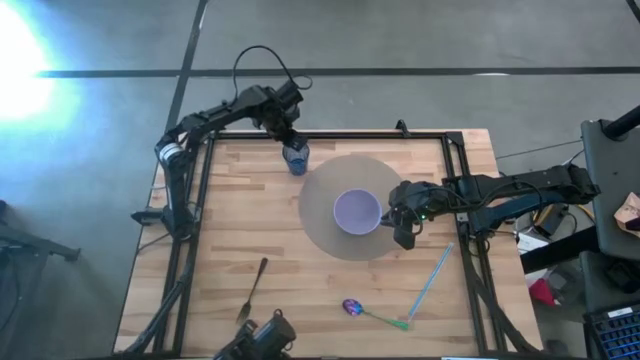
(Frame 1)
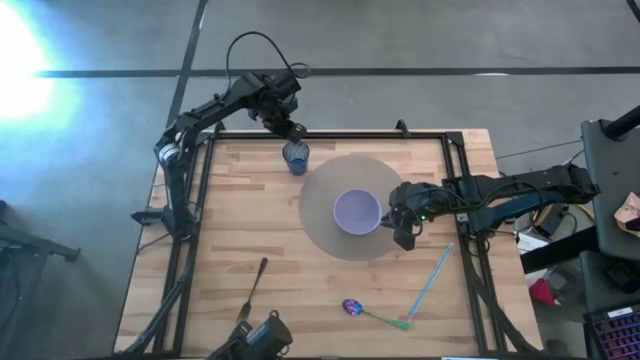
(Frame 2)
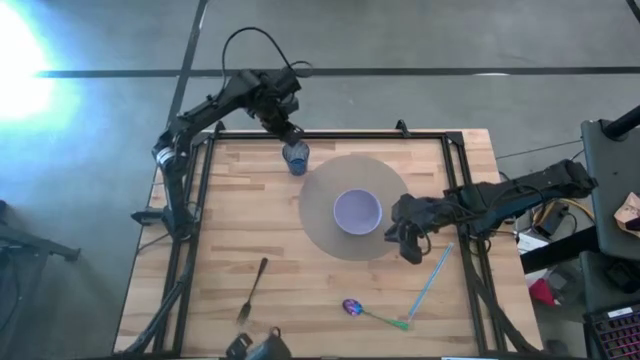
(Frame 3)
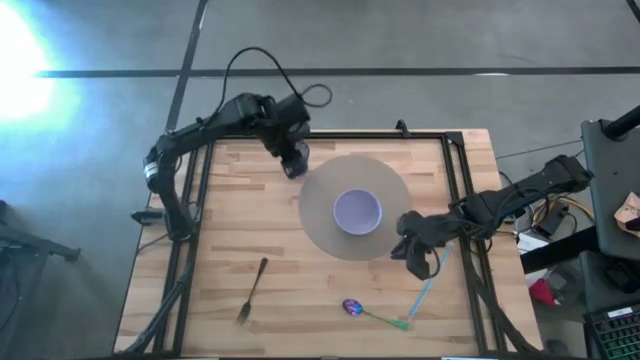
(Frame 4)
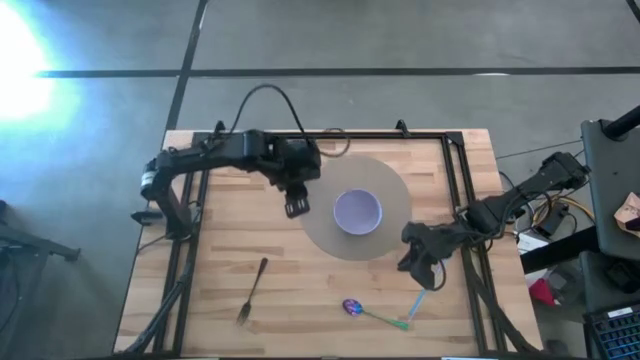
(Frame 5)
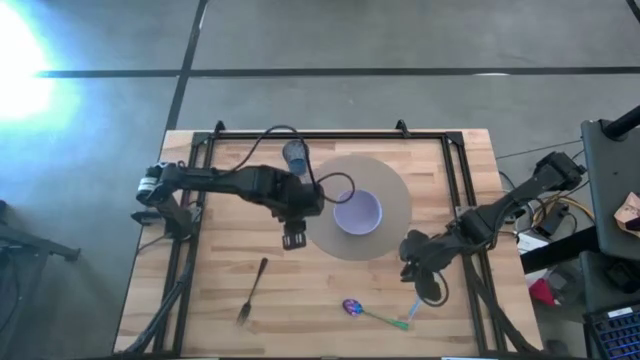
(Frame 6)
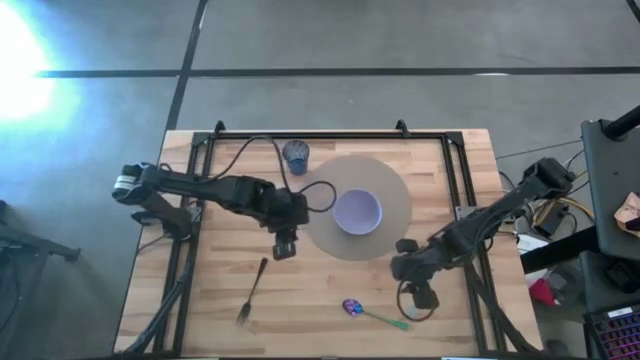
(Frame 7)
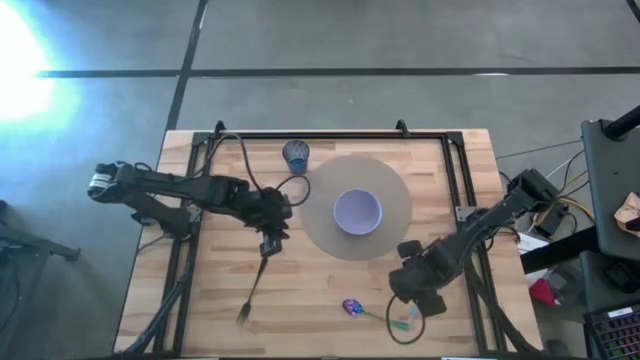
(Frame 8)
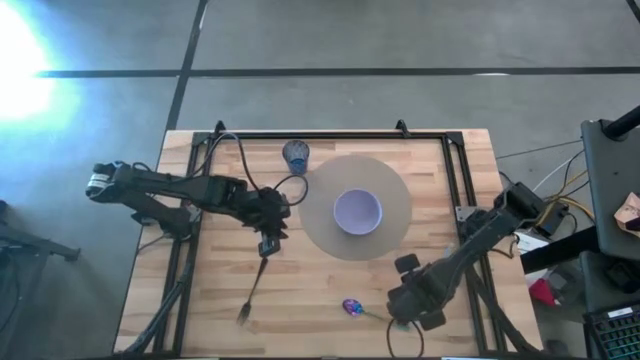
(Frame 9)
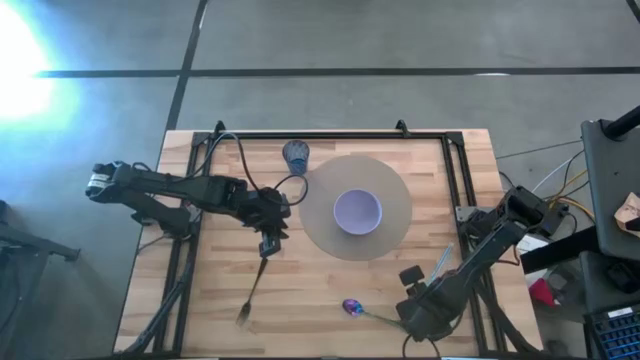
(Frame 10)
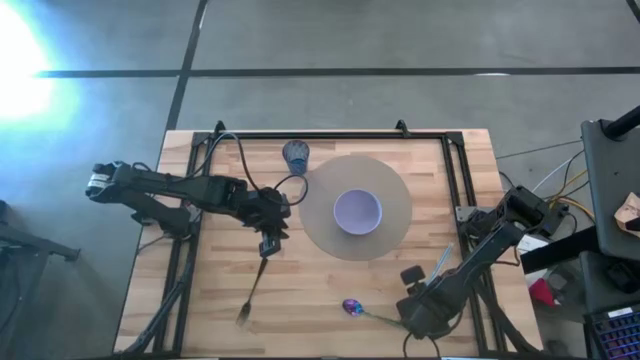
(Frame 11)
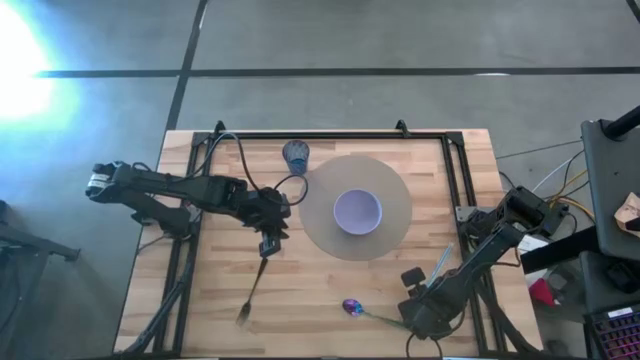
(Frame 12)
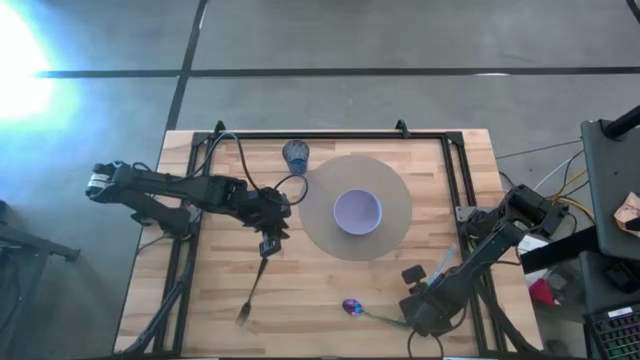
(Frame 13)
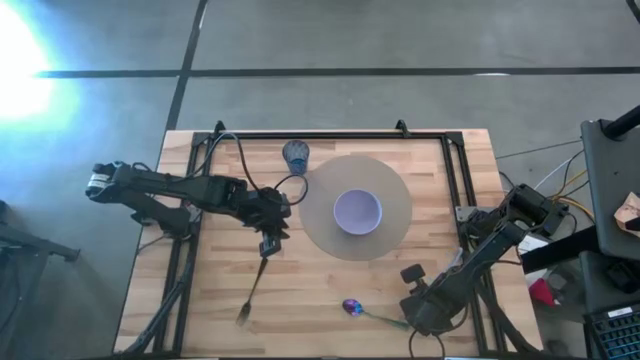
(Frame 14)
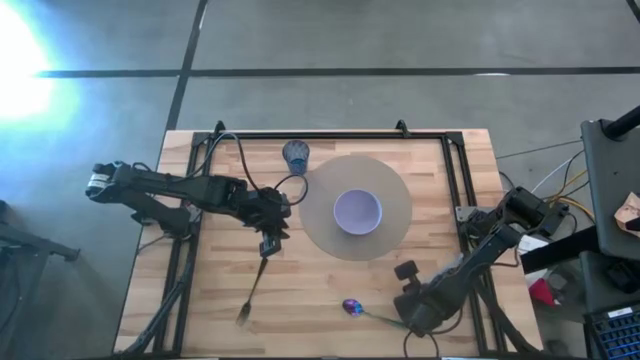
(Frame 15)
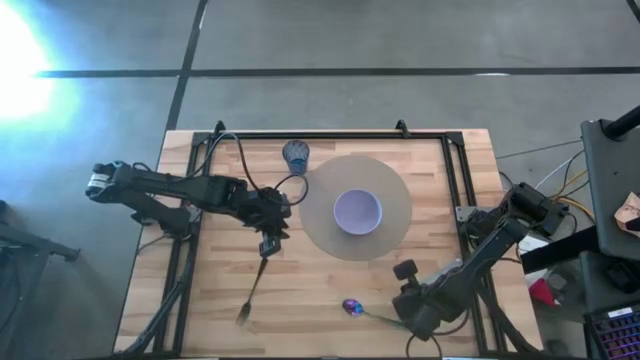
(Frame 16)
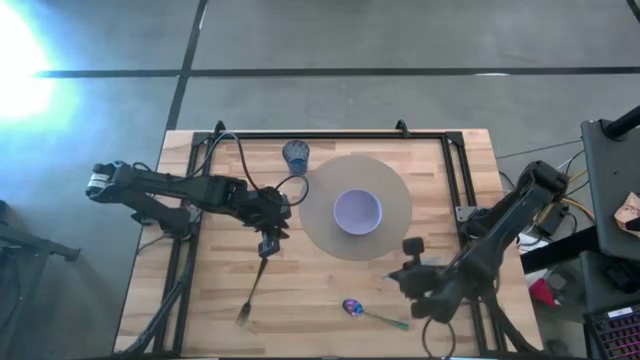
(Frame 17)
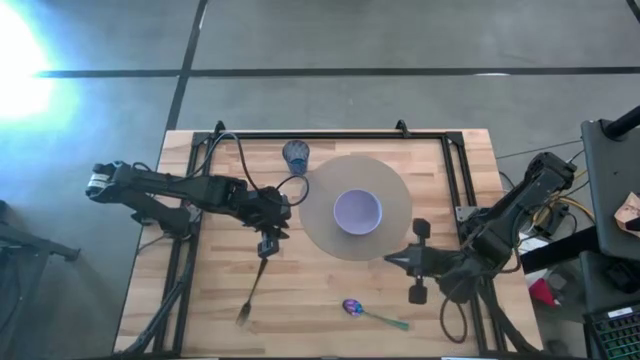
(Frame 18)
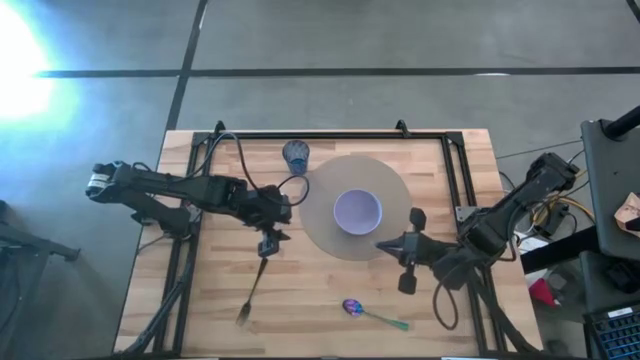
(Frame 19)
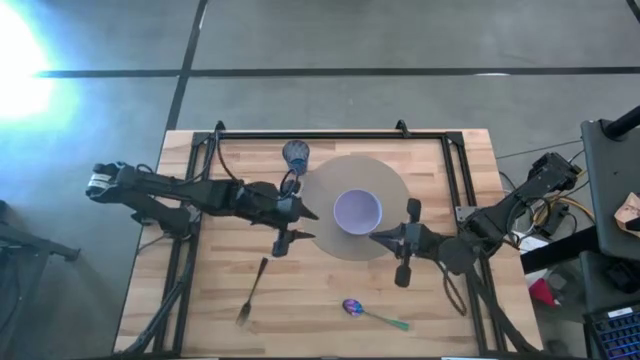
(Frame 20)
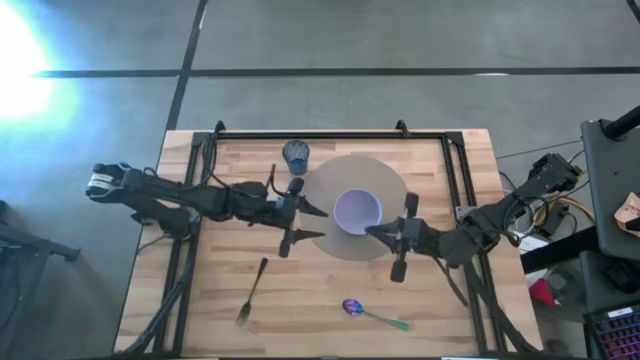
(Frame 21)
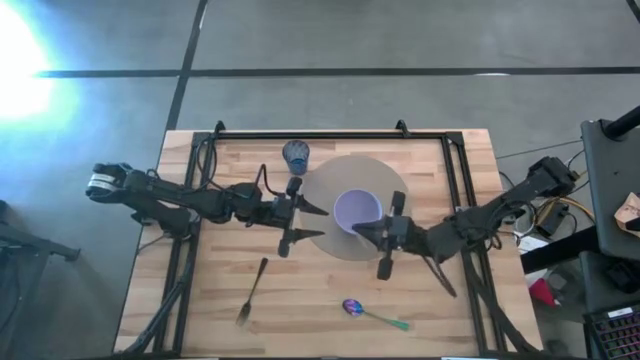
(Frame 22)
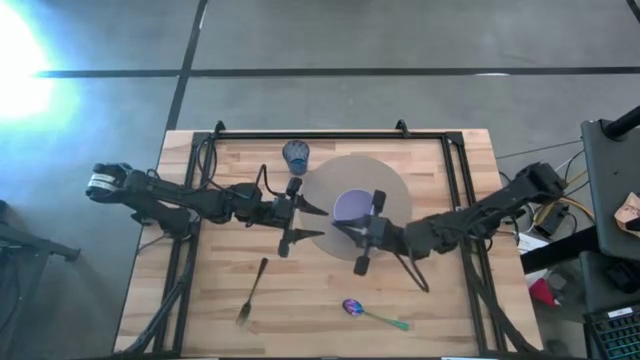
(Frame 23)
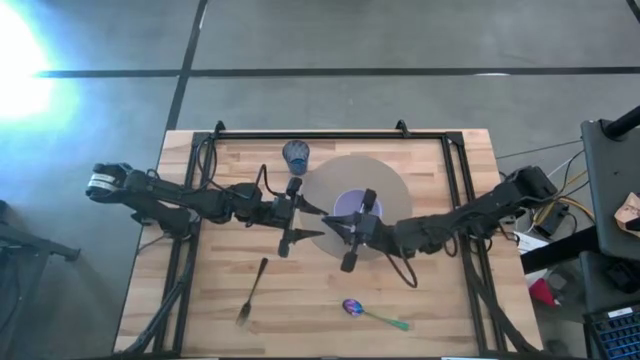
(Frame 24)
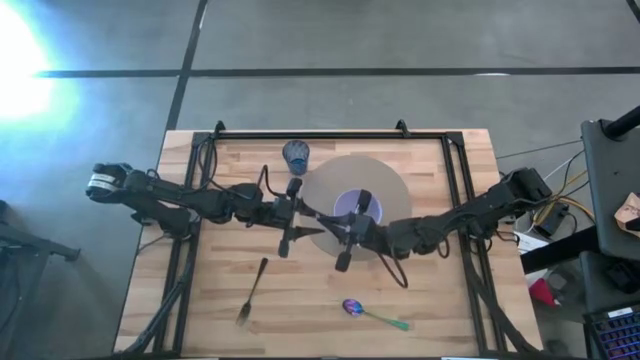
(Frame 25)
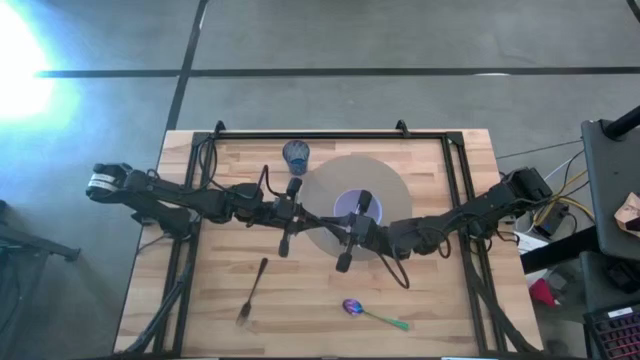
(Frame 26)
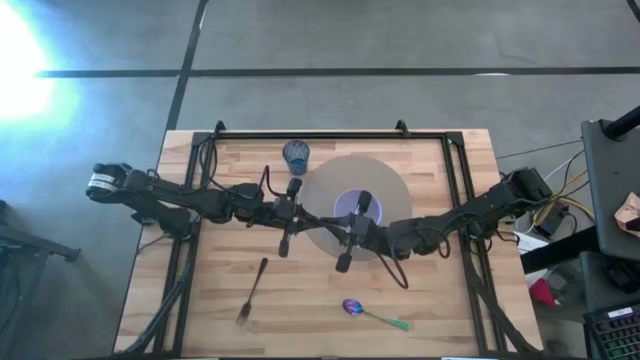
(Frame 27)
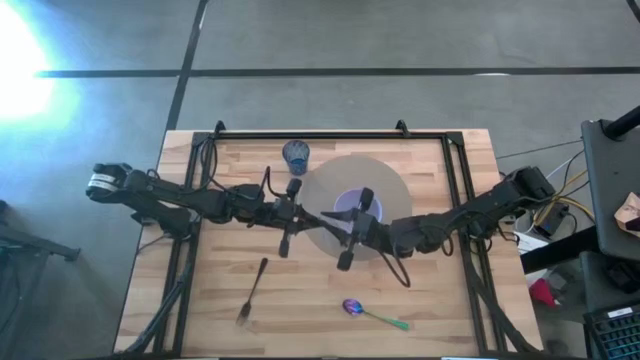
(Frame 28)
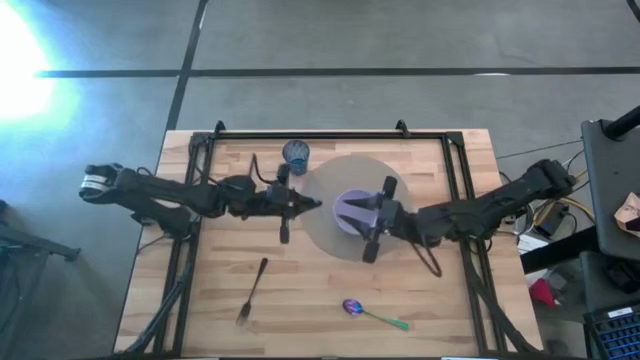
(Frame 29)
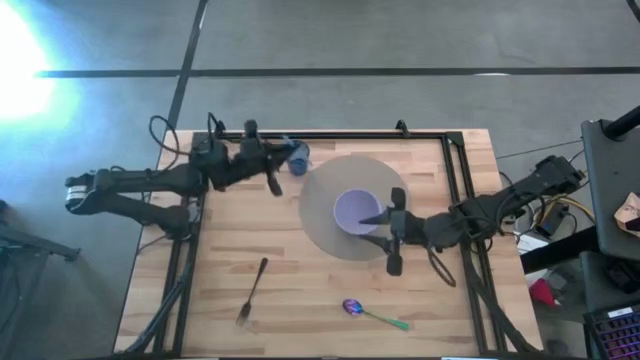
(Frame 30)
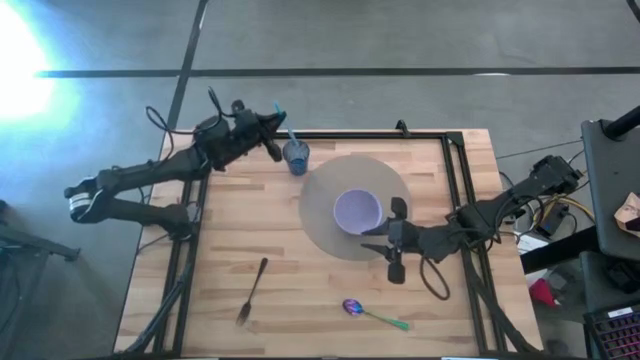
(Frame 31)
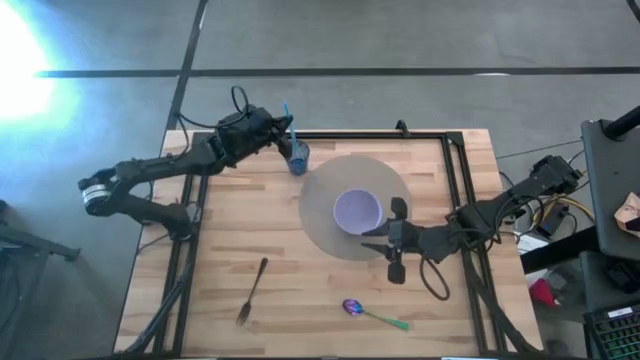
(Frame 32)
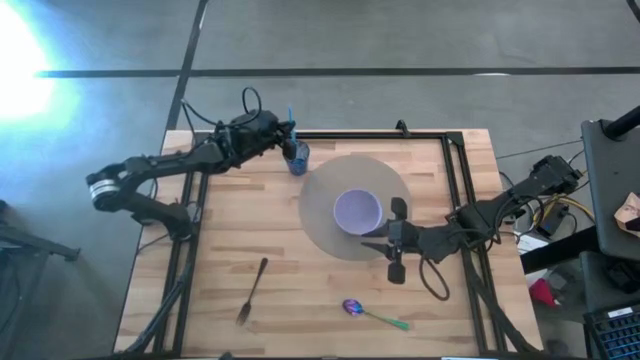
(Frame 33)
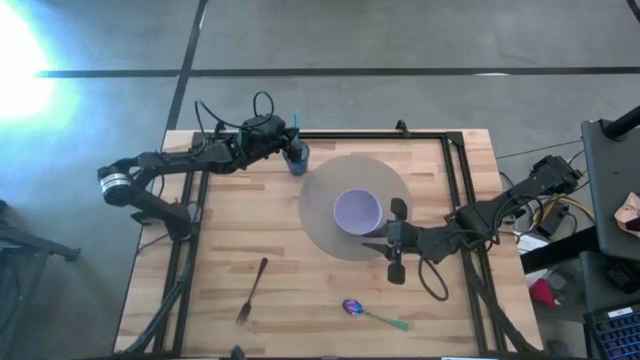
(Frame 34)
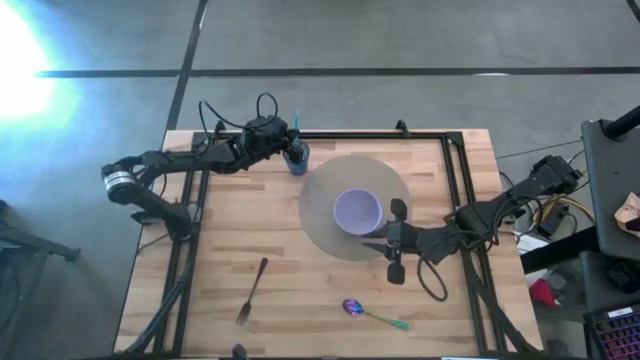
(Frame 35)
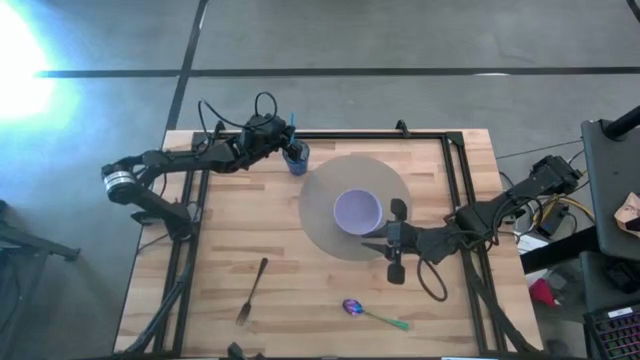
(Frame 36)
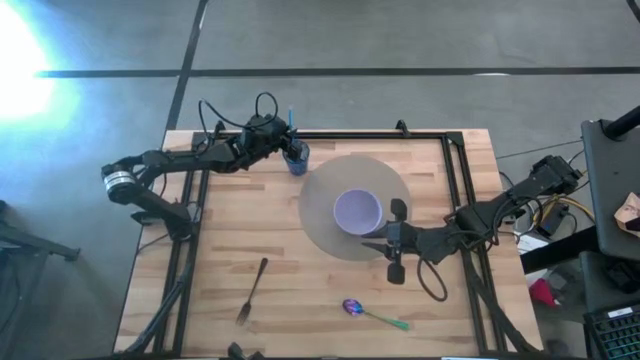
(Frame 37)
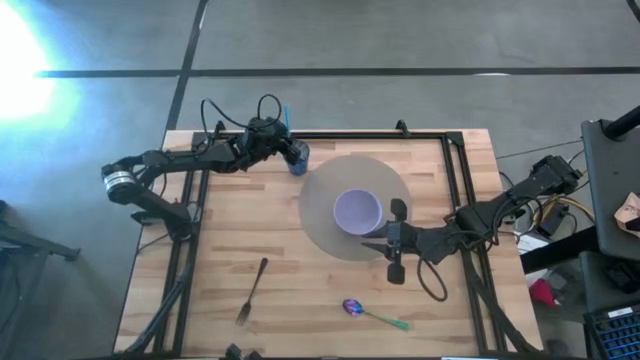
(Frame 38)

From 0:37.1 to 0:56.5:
Task: Pick & Place Utensil
Put the blue straw into the blue cup

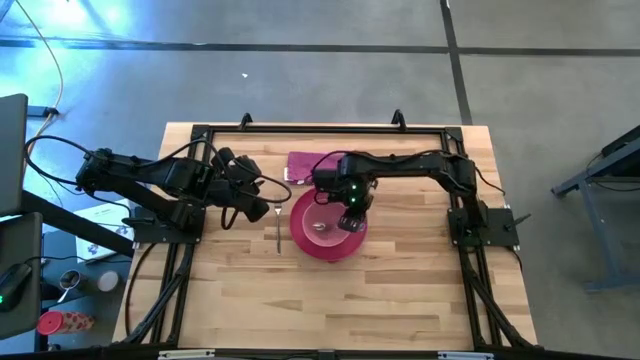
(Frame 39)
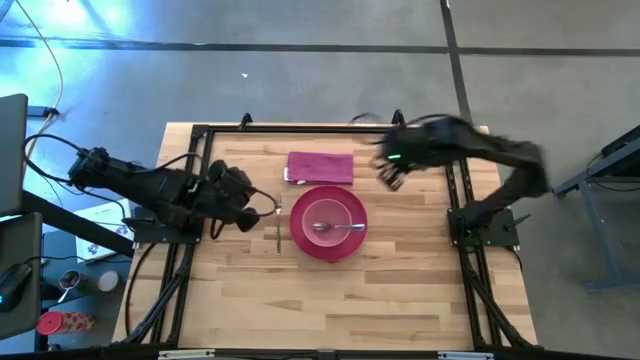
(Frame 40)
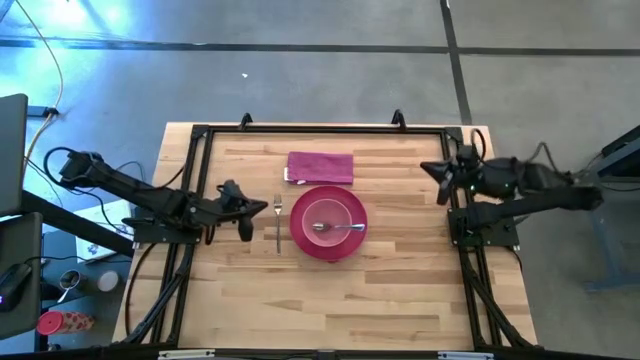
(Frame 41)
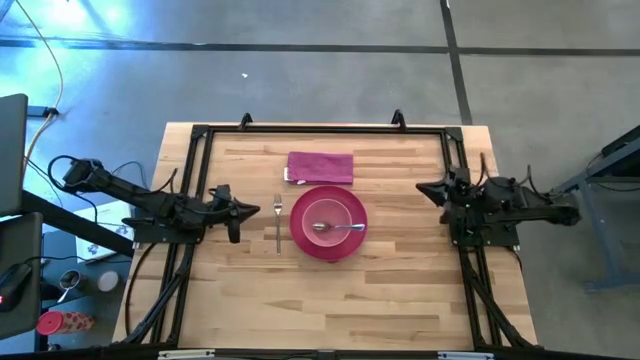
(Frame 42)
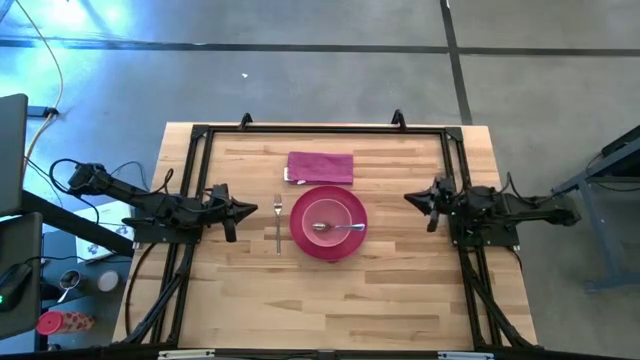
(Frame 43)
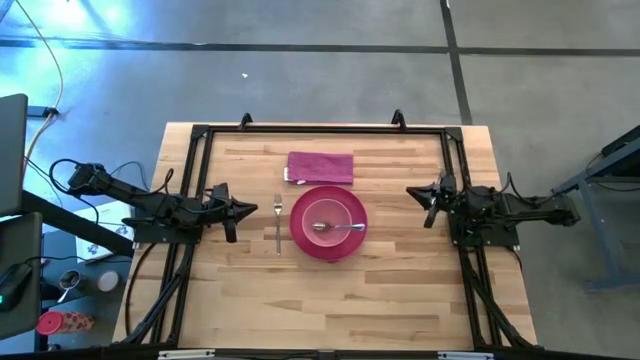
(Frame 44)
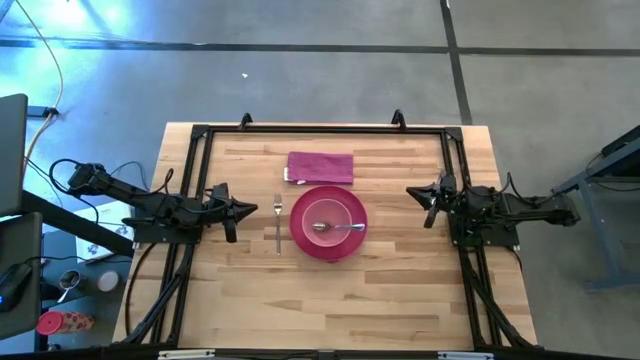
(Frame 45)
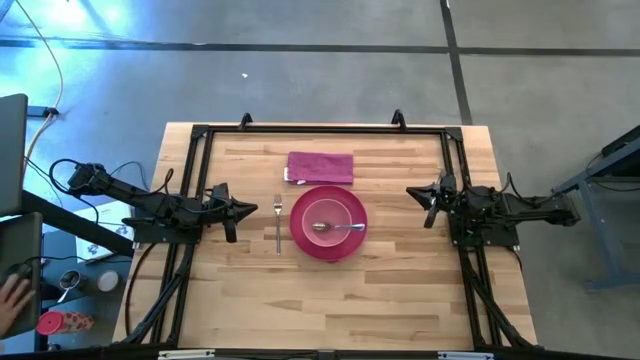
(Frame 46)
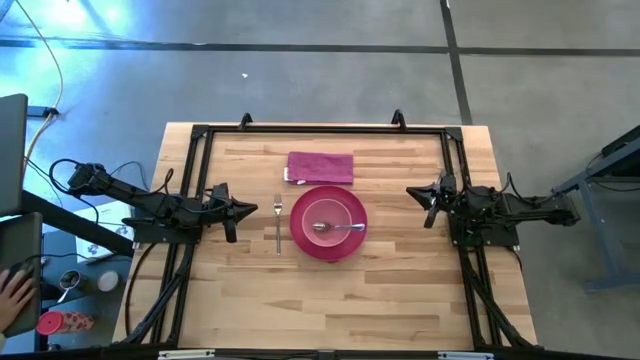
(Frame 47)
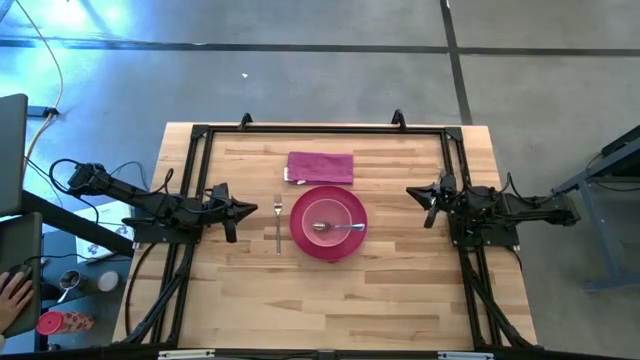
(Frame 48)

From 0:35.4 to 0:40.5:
Task: Set table place
Return to Home Position
